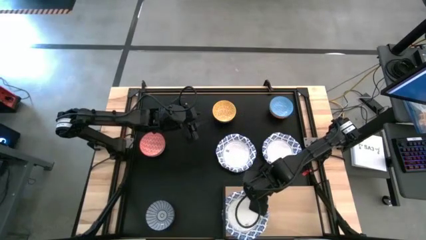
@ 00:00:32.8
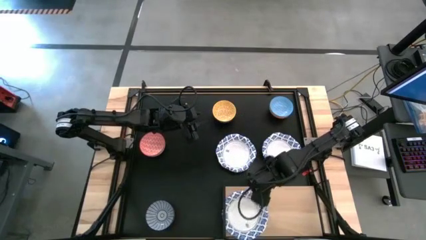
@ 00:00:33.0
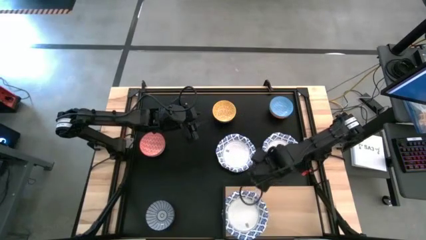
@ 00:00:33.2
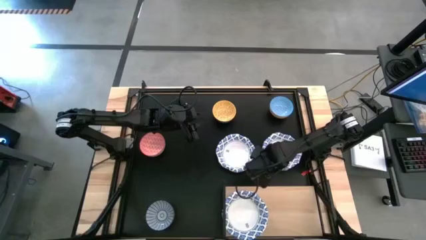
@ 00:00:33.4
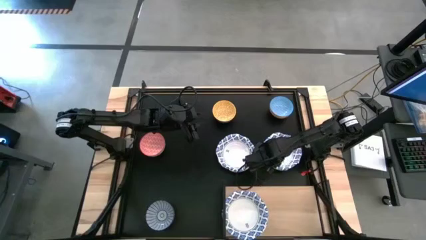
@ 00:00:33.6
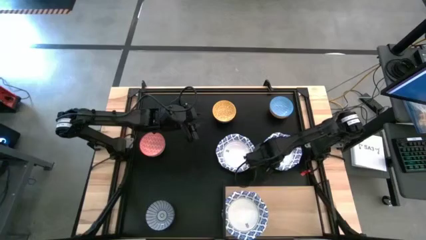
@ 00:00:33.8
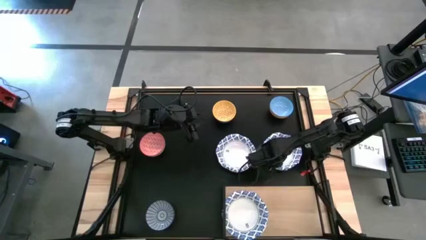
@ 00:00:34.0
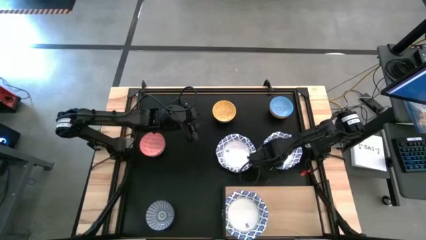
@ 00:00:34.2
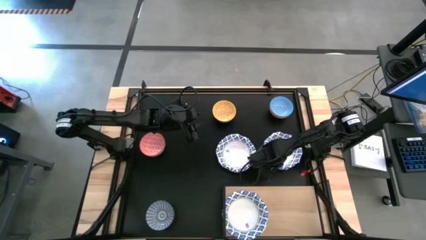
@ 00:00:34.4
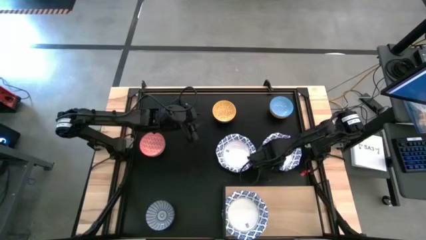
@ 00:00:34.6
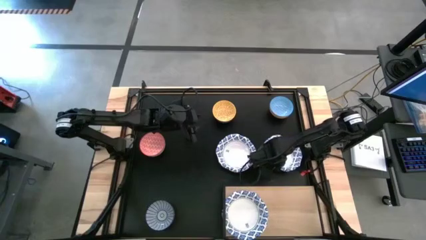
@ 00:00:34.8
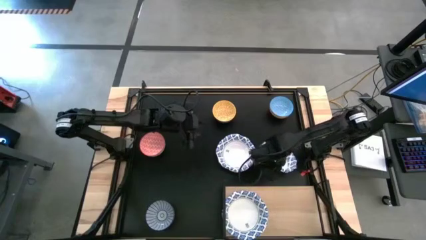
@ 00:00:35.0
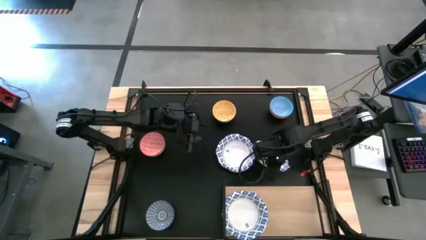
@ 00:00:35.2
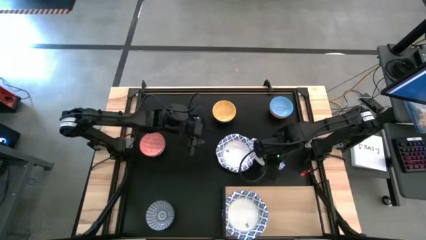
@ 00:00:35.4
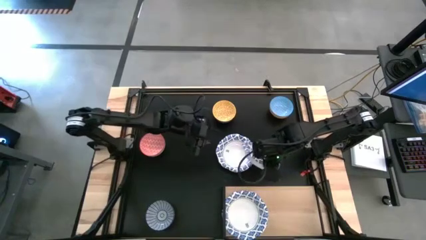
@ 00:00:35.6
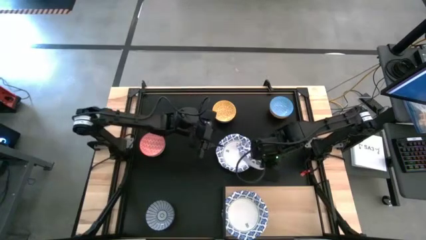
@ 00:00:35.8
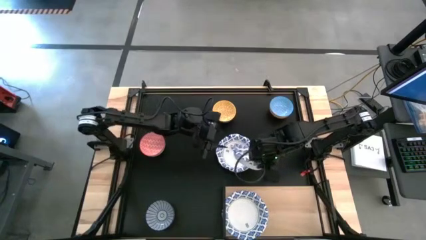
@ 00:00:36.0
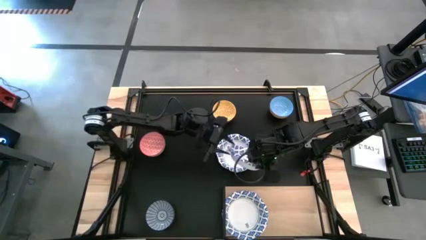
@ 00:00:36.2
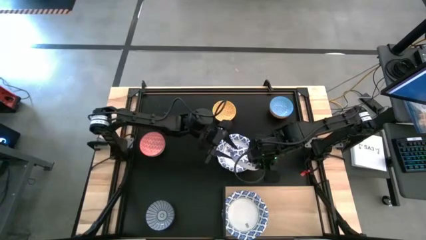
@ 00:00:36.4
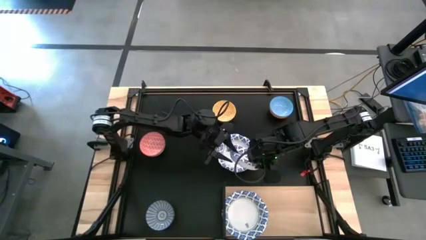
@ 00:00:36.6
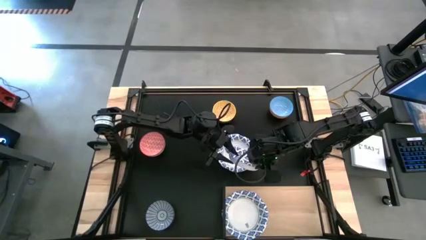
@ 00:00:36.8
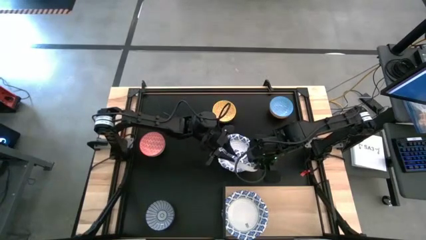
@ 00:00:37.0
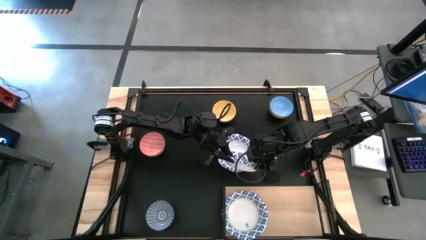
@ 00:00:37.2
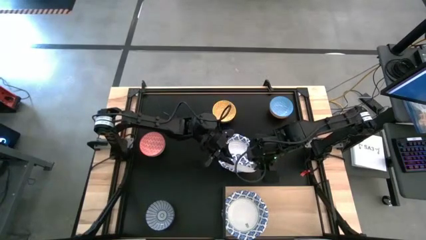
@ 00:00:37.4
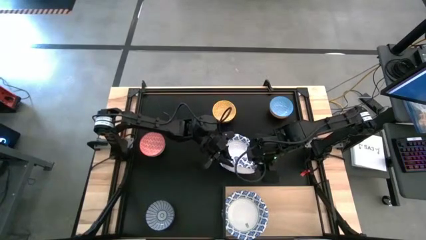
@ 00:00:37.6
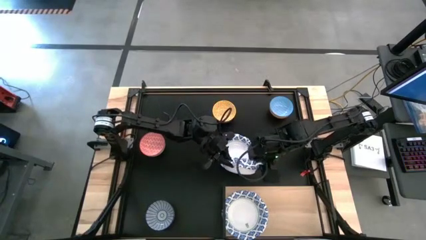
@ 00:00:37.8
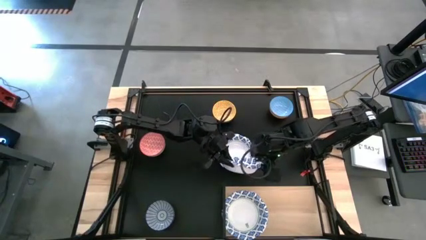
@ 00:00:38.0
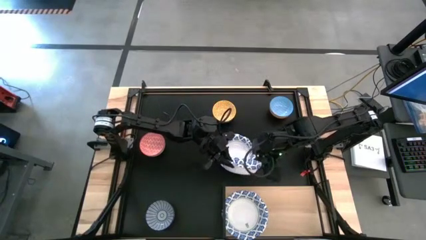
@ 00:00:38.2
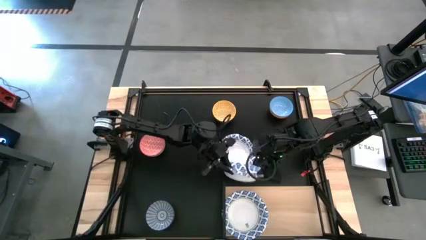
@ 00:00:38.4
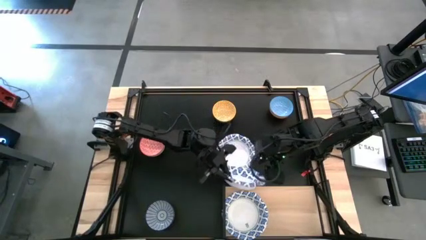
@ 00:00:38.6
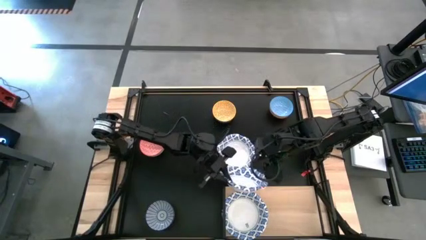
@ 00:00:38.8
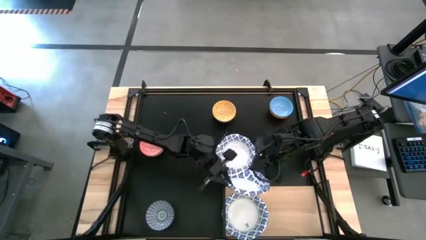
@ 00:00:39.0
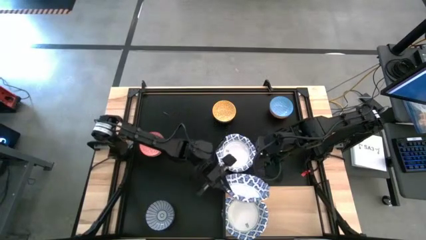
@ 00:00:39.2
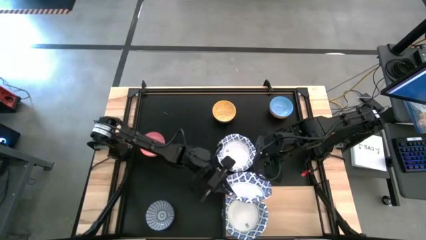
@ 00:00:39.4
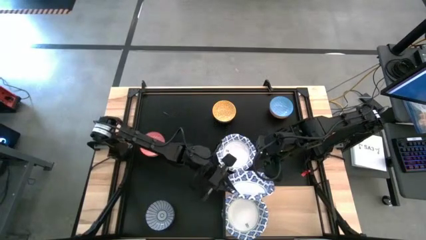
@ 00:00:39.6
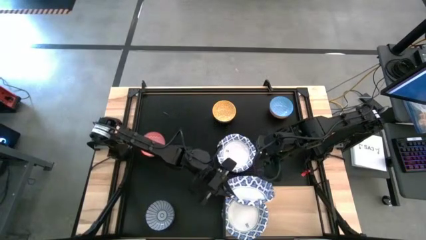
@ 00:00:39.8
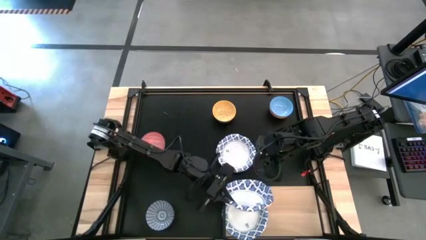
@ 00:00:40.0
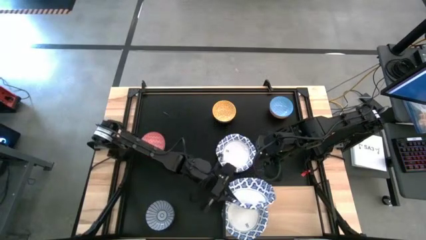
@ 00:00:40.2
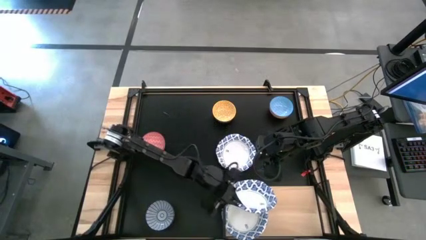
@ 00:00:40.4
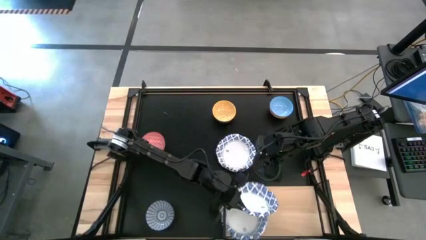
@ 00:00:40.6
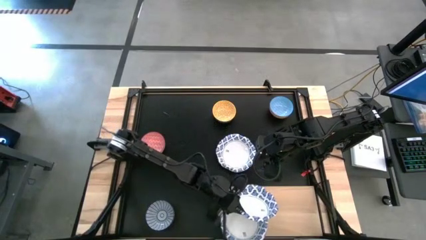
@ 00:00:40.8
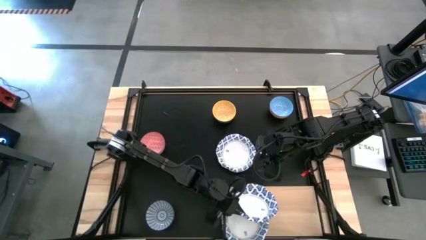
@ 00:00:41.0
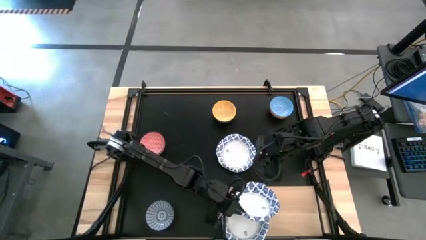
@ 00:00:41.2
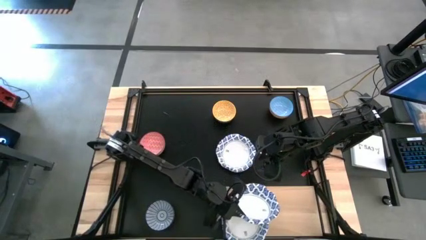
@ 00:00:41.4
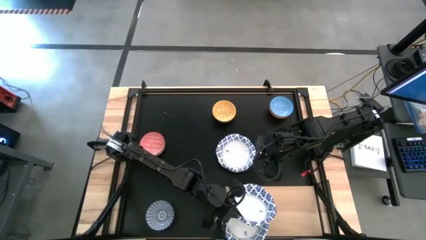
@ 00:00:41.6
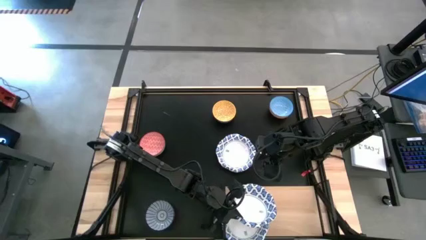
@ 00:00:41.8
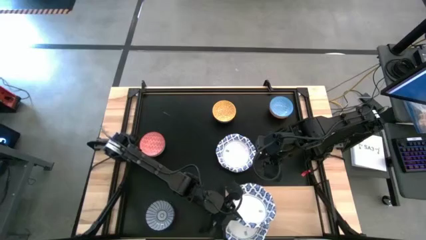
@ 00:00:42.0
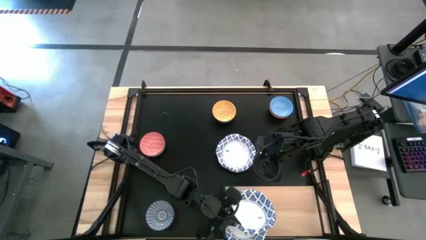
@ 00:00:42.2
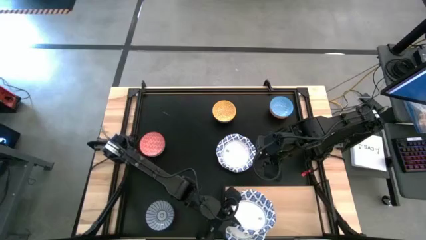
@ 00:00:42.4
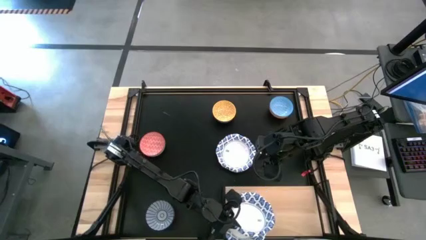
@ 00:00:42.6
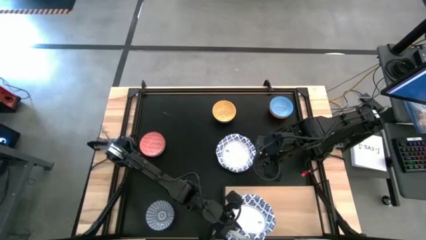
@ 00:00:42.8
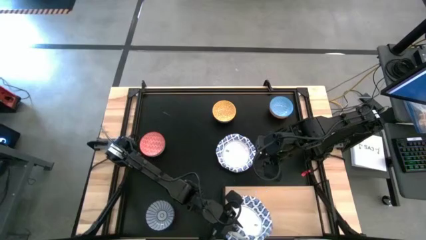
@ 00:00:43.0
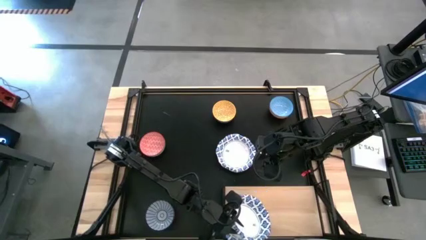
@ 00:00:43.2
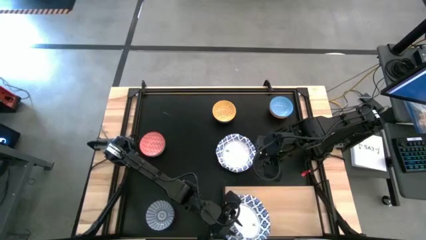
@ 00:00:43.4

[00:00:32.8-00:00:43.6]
Task: Place and stack bowls onto a shelf
Stack the right white patterned bowl on top of the other white patterned bowl on the shelf

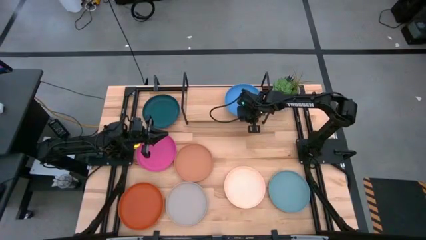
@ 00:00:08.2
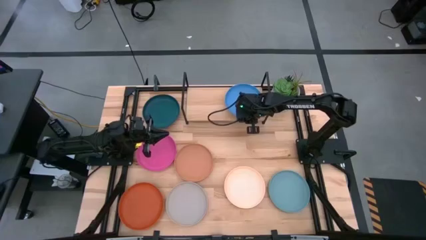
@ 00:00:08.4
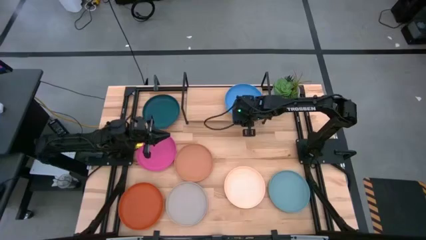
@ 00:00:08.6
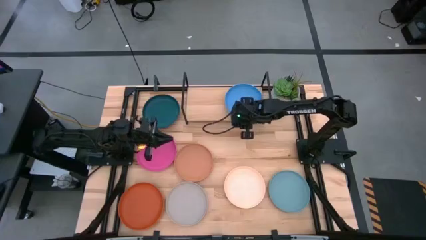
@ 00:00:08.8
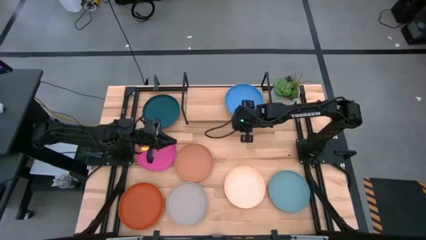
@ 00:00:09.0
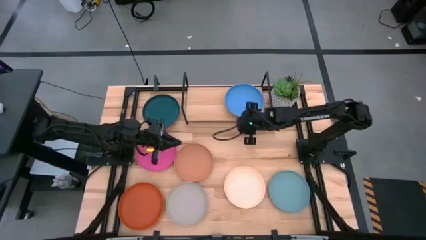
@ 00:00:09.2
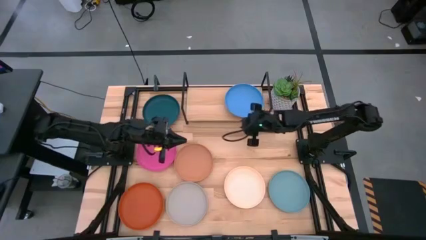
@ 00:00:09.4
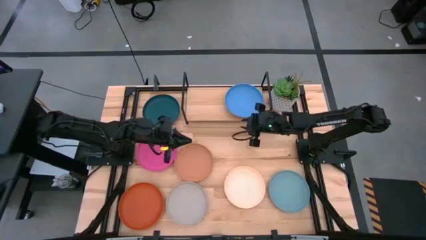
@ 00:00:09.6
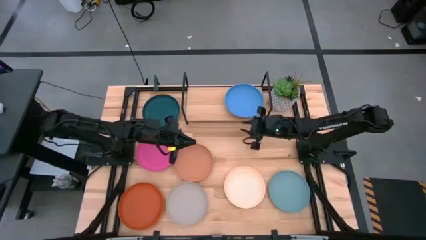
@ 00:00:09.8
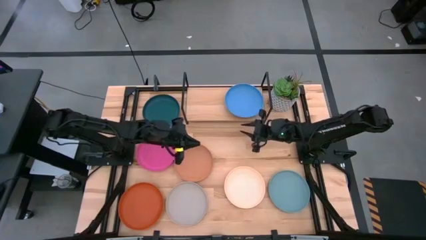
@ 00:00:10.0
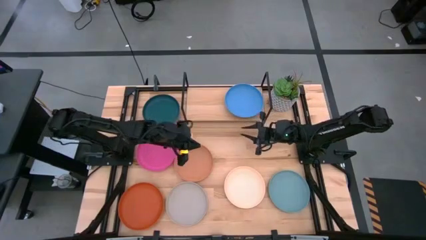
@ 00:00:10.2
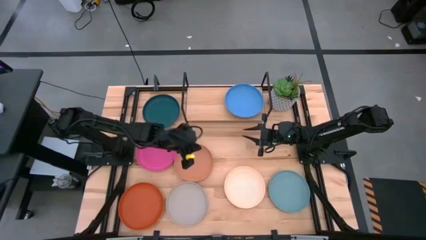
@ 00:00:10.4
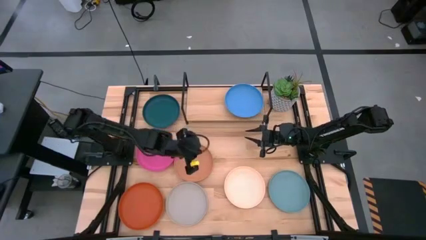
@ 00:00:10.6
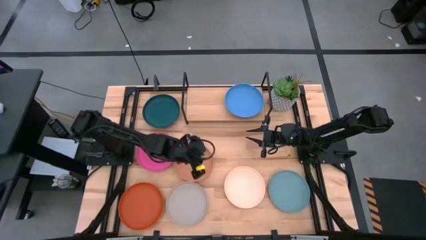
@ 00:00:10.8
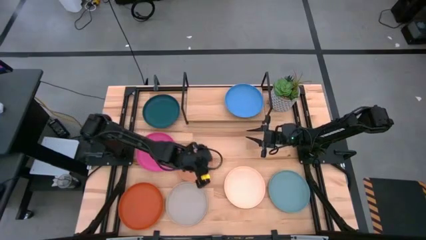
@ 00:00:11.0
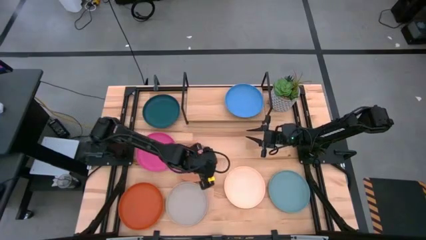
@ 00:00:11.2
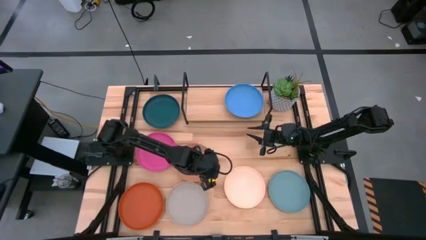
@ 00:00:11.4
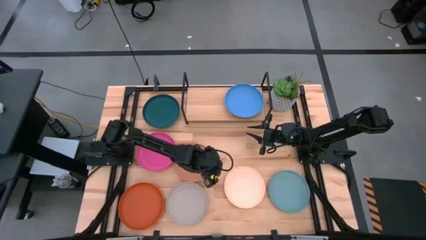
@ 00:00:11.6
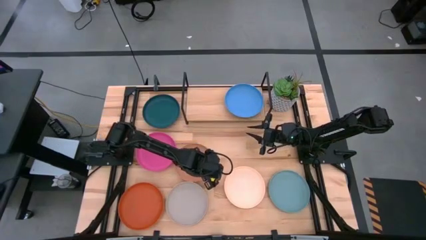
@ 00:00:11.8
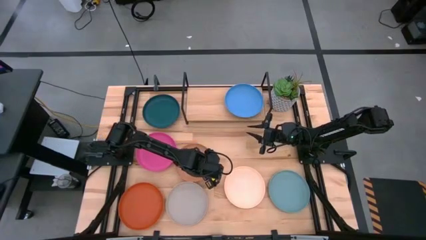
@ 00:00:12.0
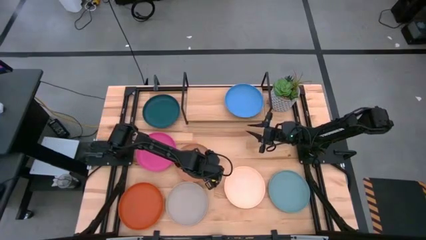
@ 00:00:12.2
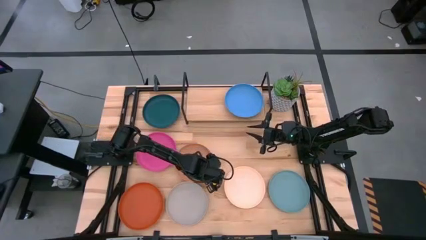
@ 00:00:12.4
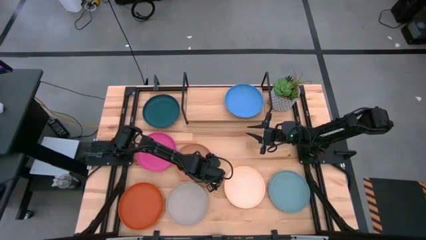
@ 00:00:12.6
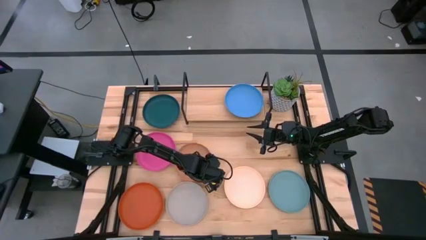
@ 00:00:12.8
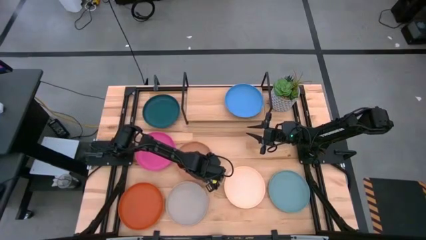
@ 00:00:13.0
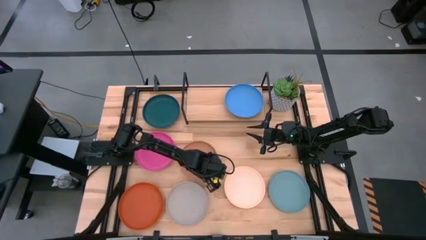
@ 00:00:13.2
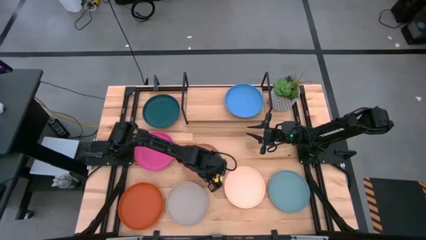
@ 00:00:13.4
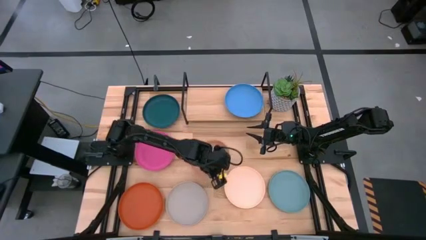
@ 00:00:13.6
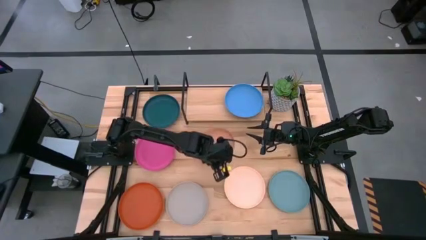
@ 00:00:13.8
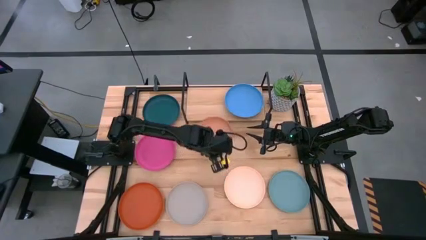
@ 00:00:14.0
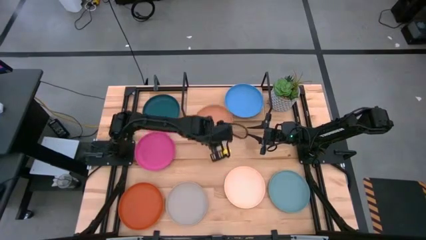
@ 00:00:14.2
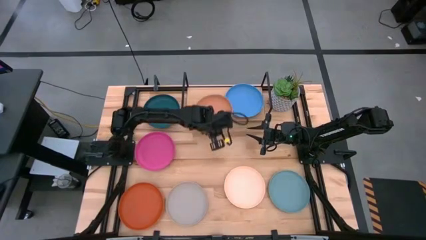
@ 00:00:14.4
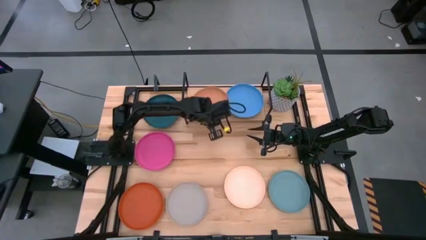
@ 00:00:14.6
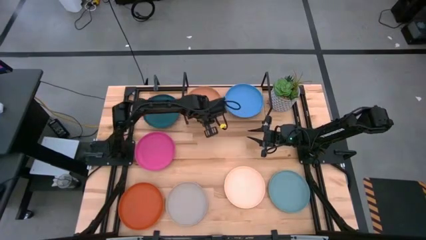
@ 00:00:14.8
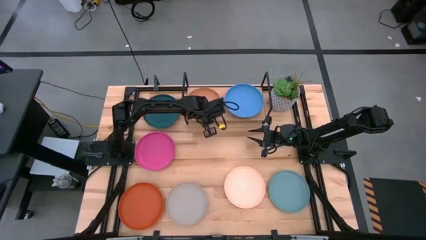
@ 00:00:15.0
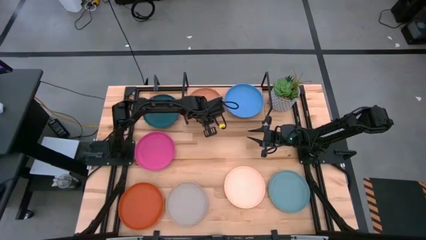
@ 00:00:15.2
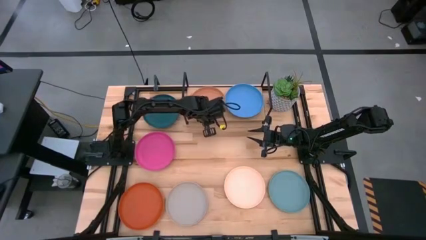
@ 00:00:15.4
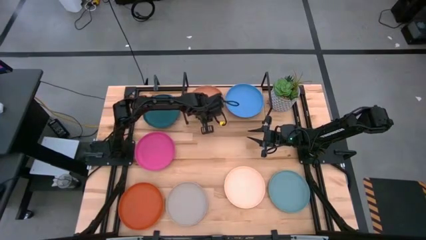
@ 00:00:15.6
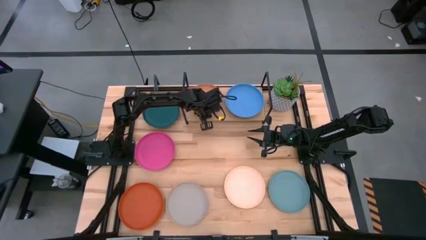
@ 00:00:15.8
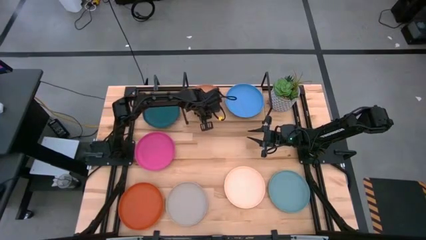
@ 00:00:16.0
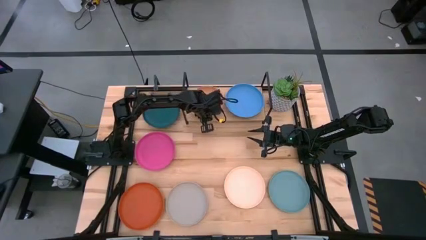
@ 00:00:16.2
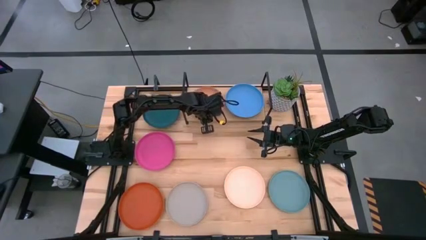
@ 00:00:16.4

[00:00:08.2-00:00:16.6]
Task: Place and stack plates onto a shelf
Put the brown plate on the shelf
